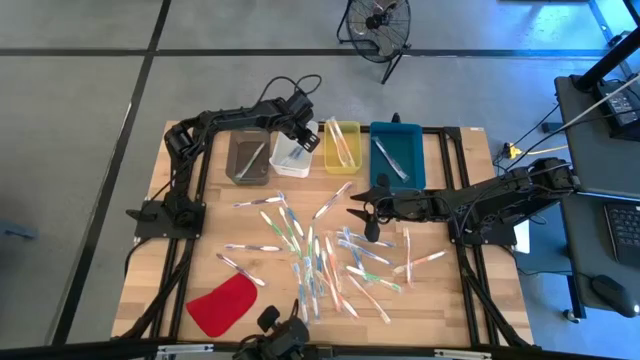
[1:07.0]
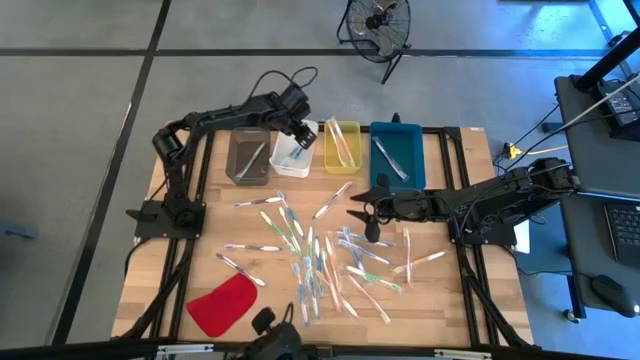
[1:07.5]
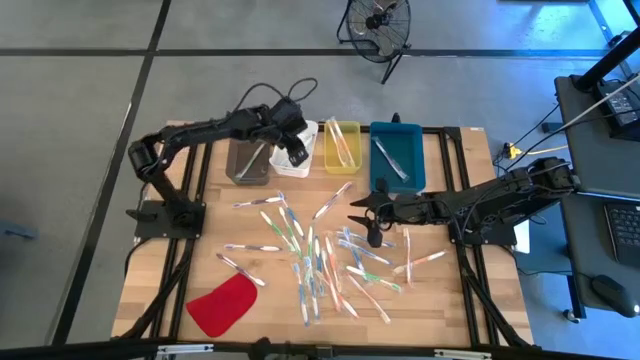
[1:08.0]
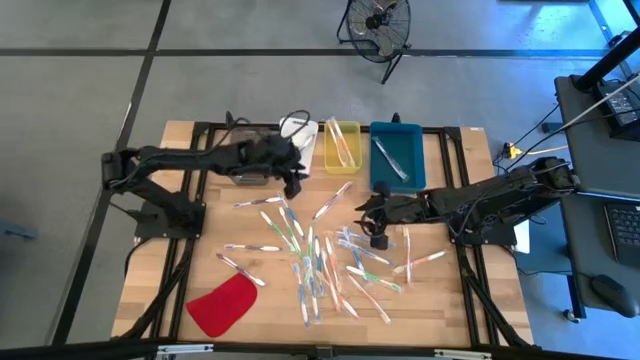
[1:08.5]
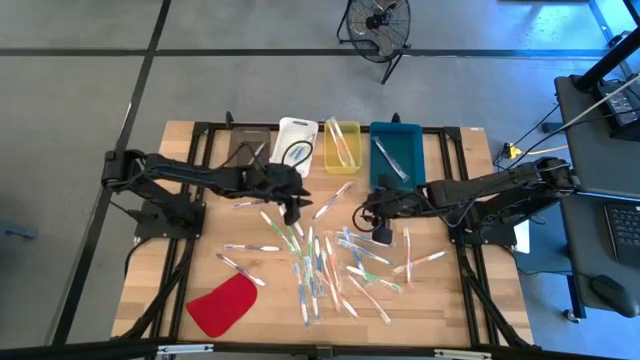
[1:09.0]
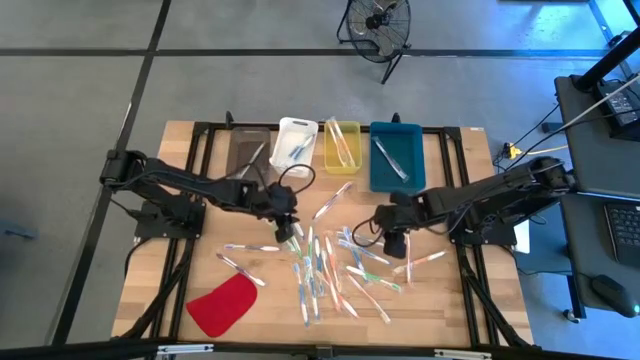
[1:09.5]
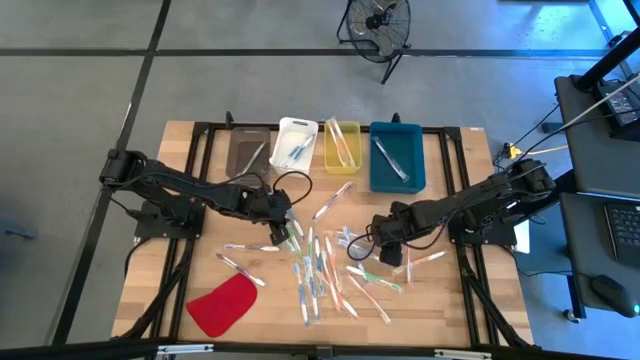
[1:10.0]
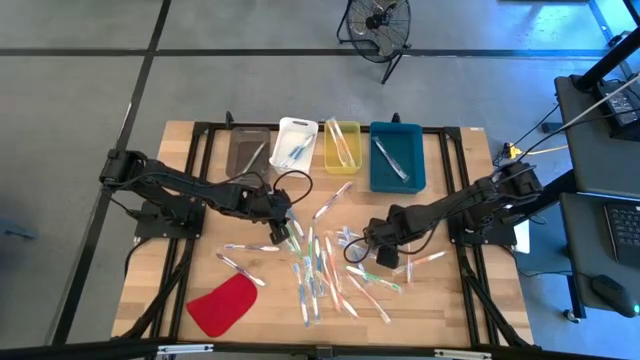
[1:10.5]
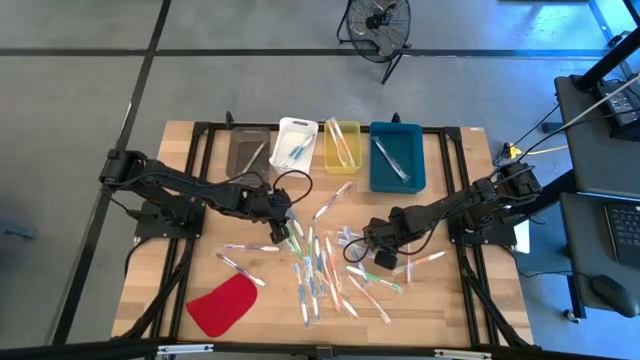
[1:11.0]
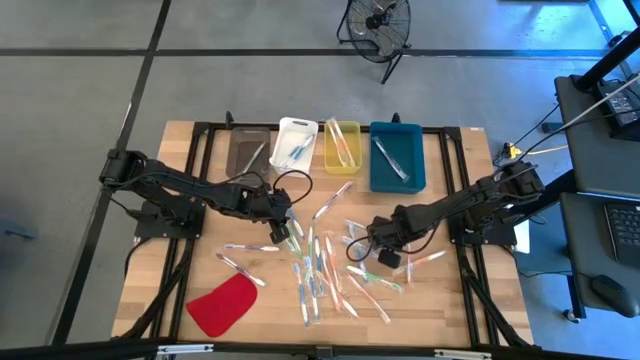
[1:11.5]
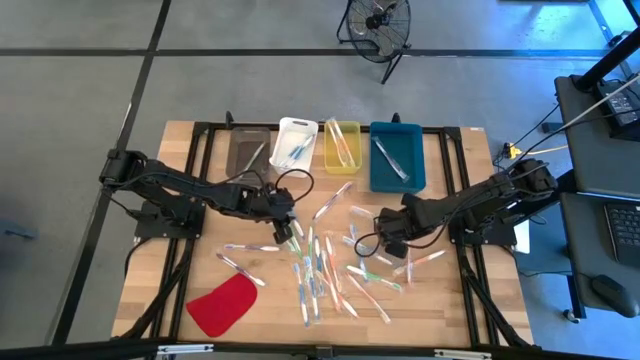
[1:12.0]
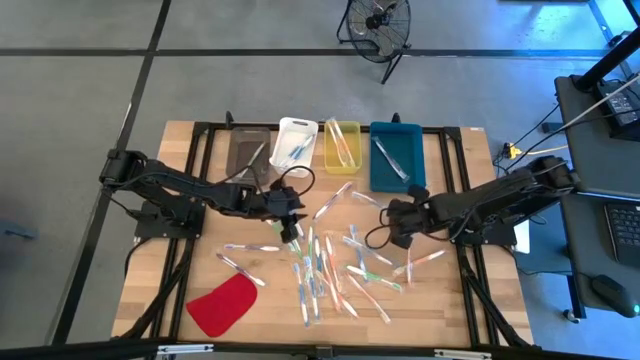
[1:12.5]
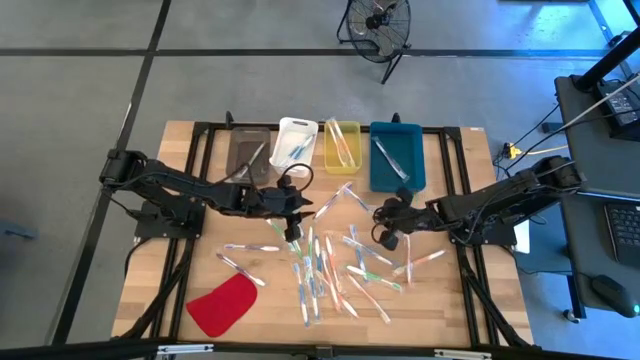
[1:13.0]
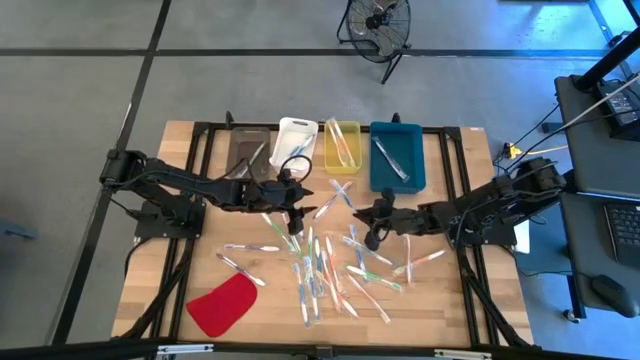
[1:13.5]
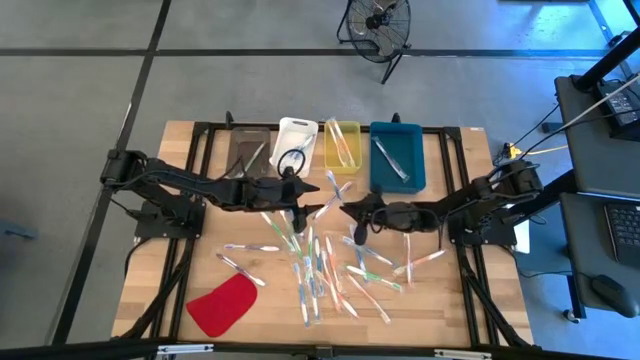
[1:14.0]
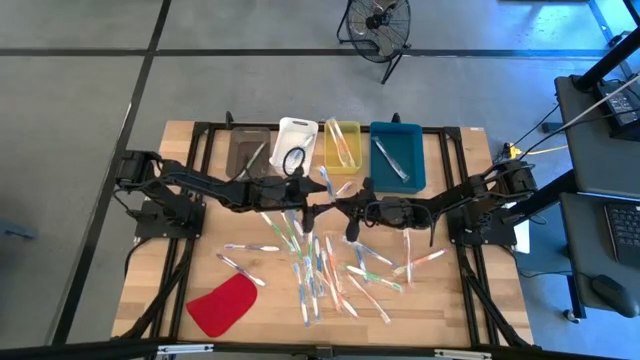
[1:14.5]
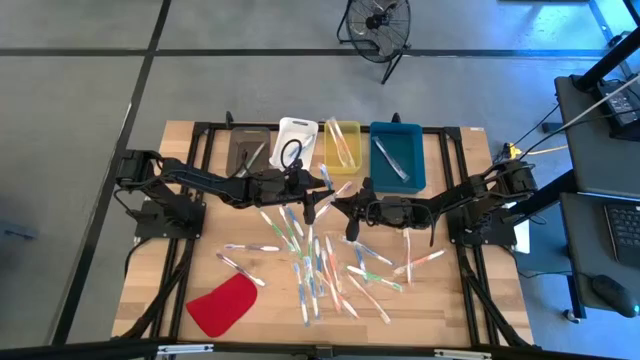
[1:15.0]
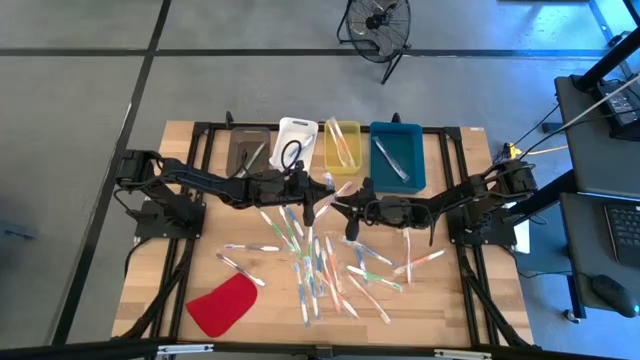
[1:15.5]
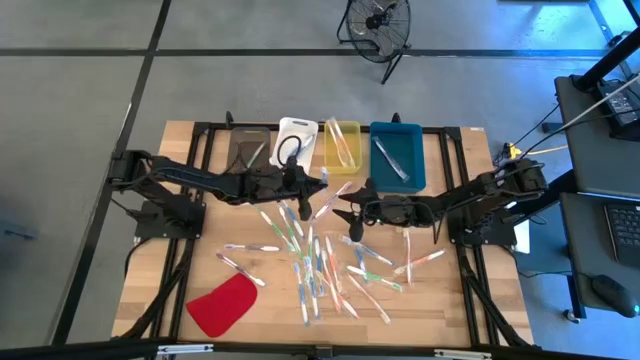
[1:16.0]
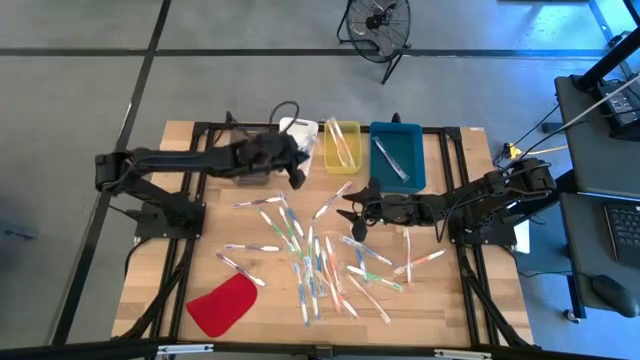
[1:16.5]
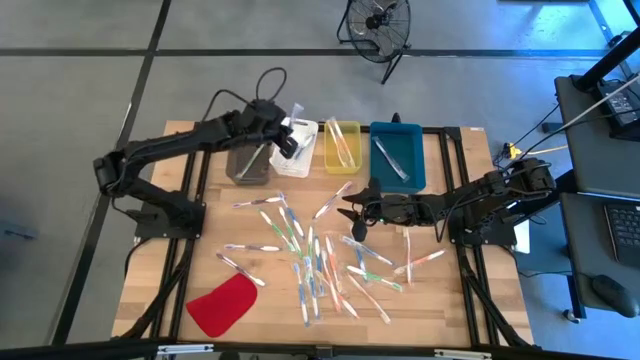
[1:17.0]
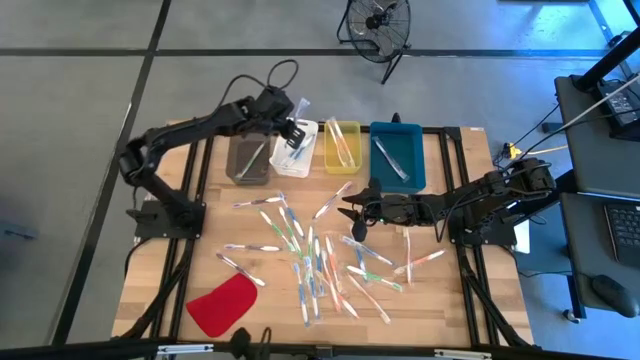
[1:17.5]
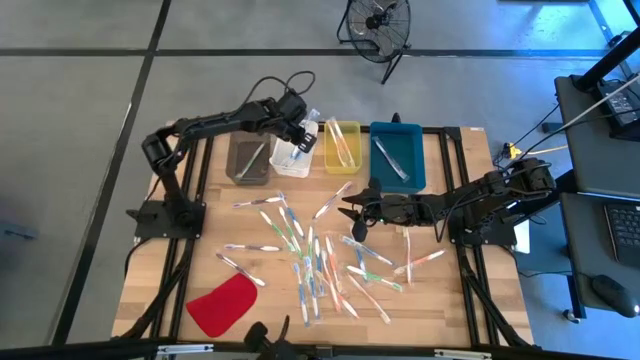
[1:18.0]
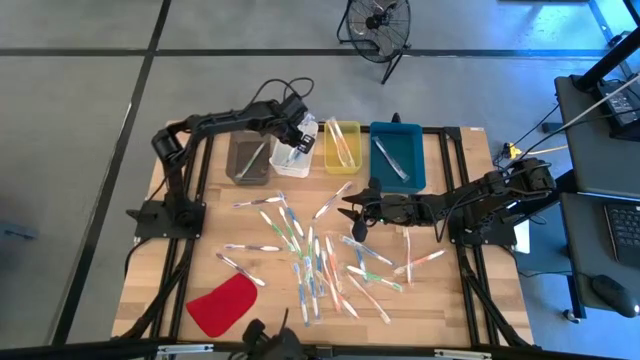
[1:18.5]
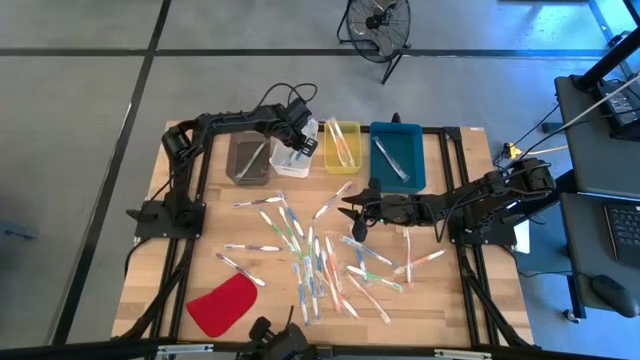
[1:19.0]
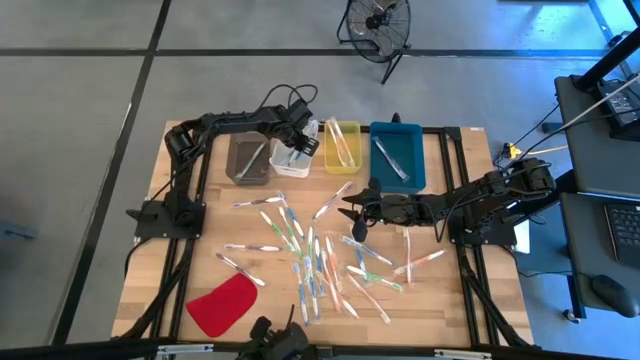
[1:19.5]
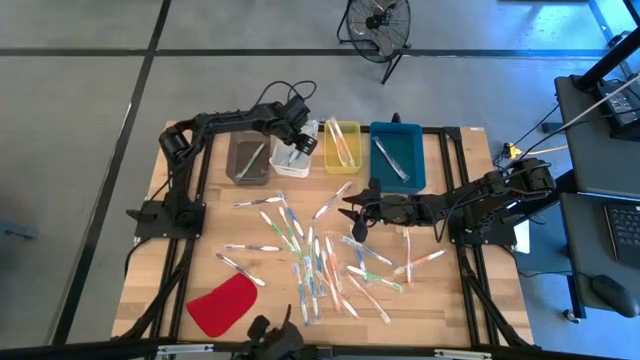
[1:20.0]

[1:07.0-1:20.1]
Task: Pick & Place Toothbrushes
Put the blue toothbrush into the white bin

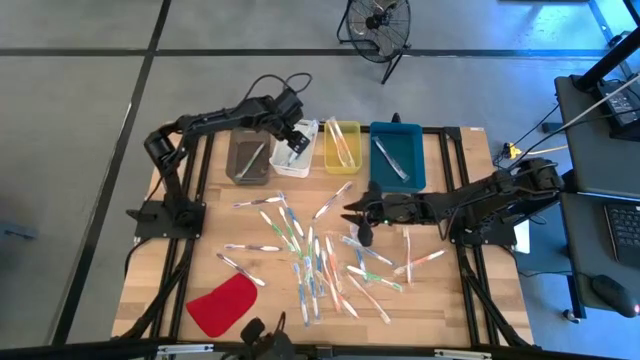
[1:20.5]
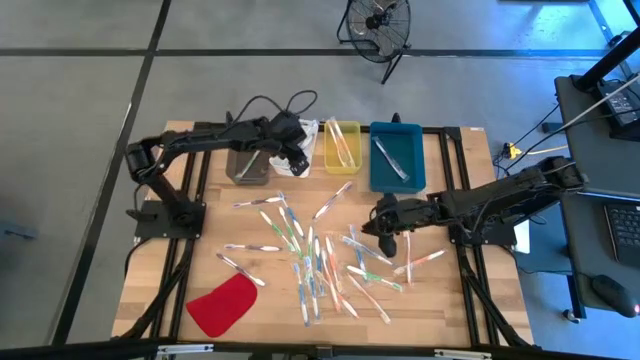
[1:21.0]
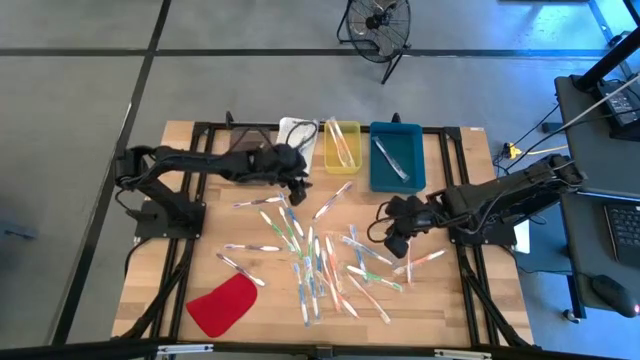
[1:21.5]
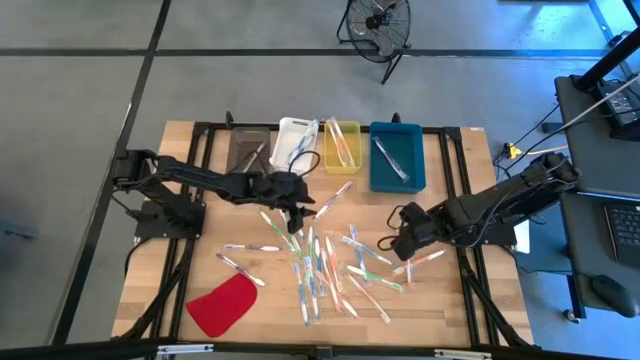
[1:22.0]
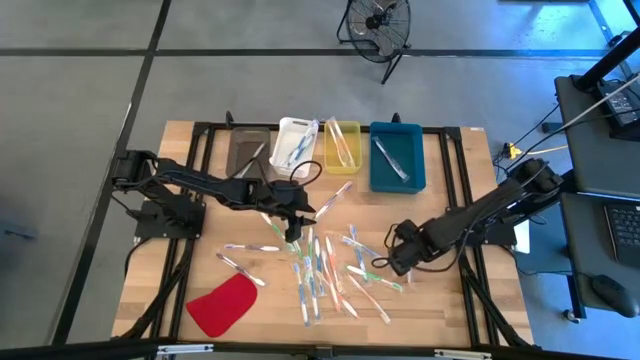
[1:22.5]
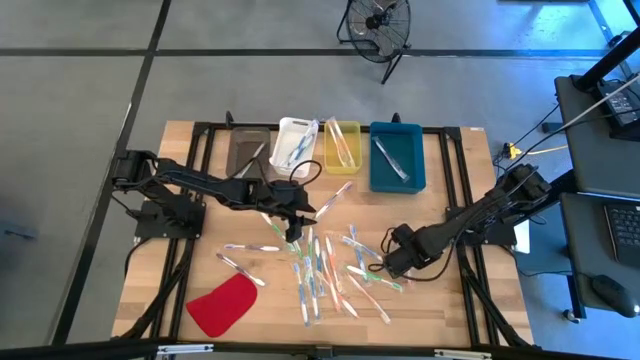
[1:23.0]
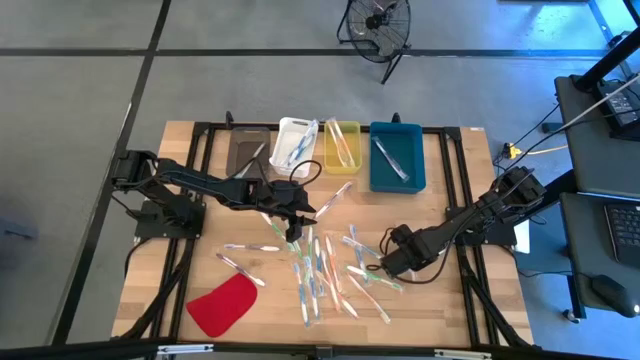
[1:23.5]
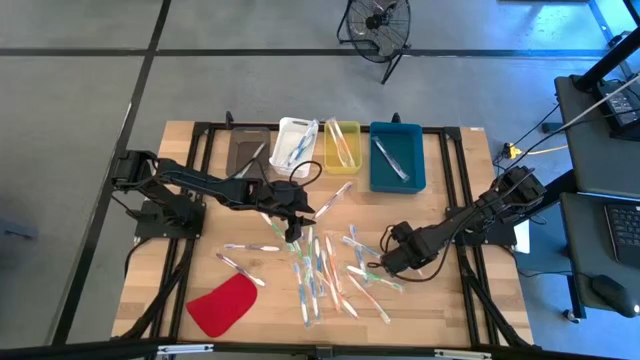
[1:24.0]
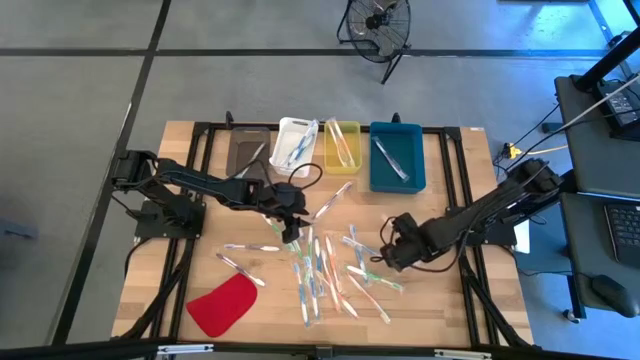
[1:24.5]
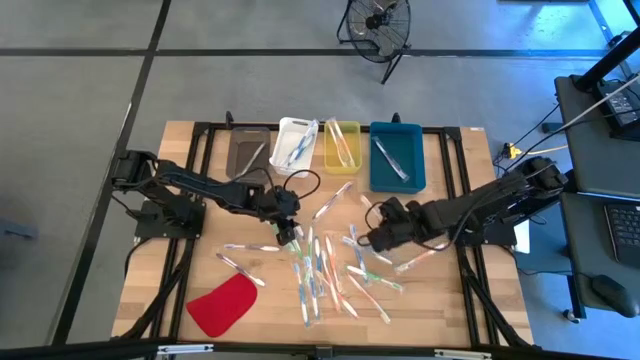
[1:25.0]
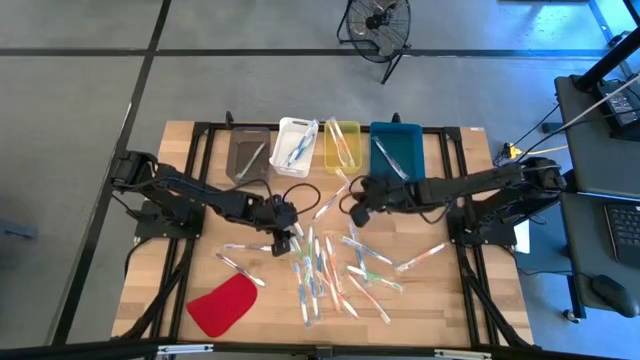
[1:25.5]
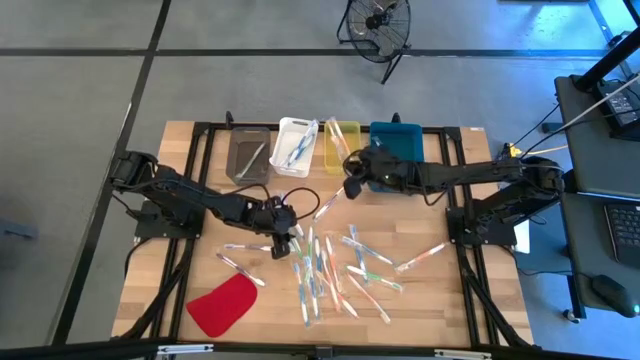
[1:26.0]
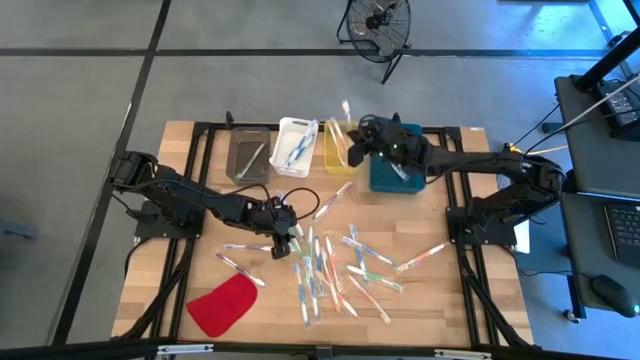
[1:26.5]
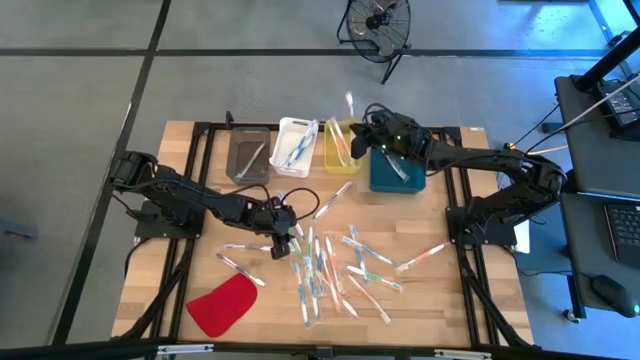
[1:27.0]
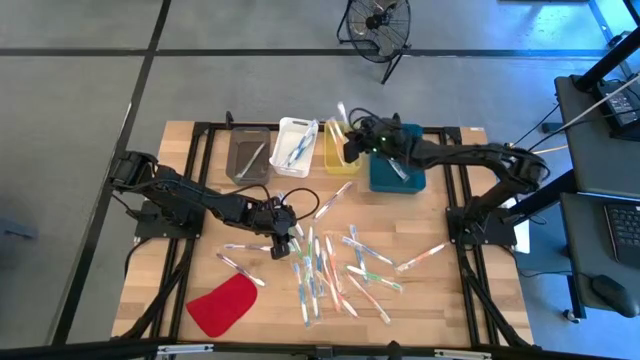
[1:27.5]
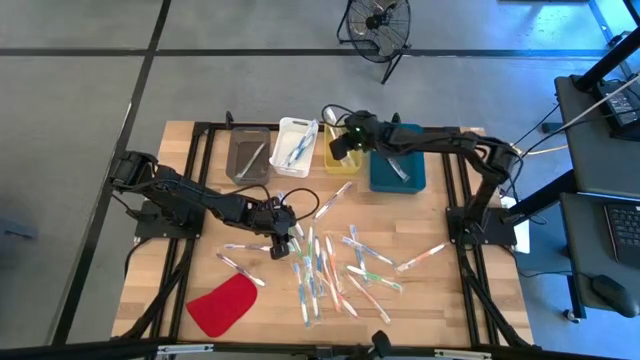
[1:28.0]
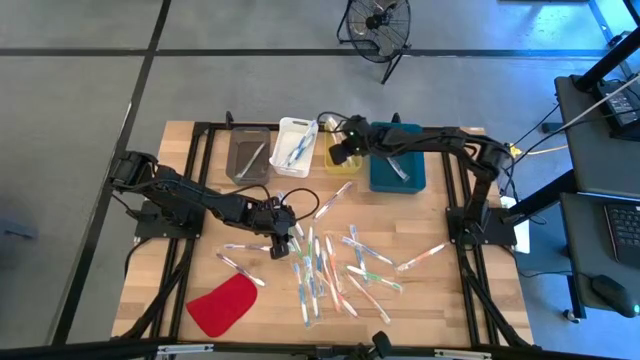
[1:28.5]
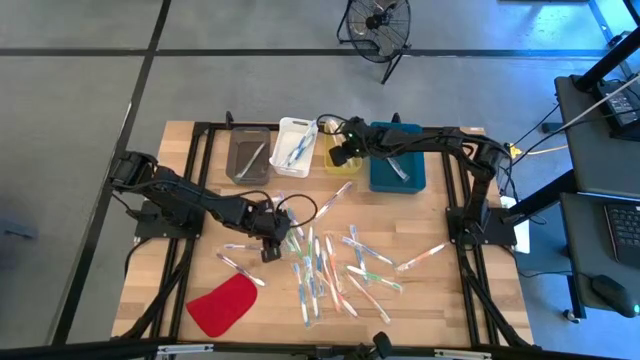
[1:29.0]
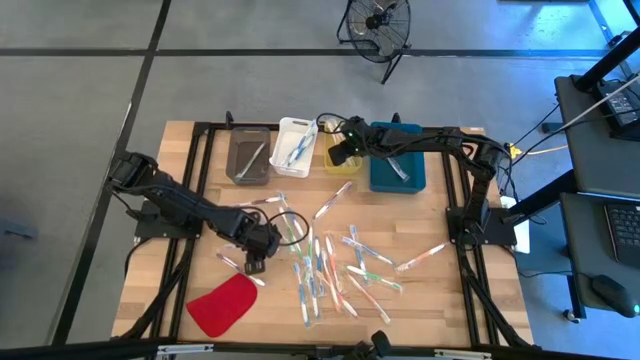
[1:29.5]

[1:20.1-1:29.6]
Put the orange toothbrush into the yellow bin
